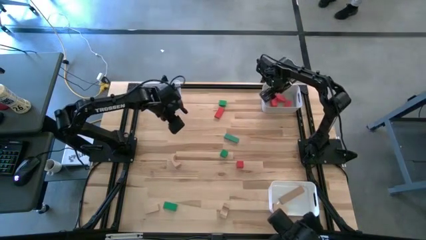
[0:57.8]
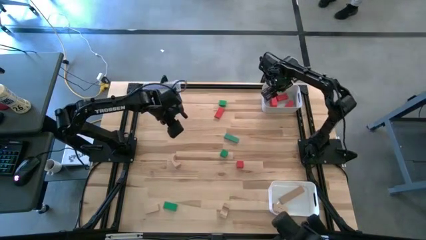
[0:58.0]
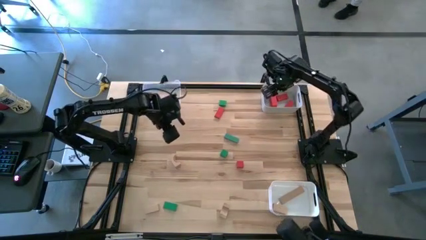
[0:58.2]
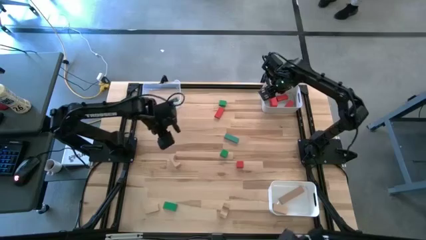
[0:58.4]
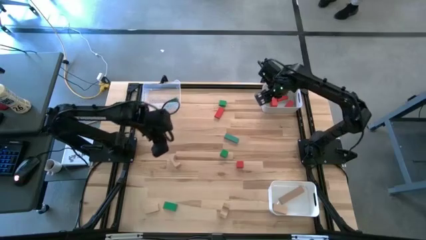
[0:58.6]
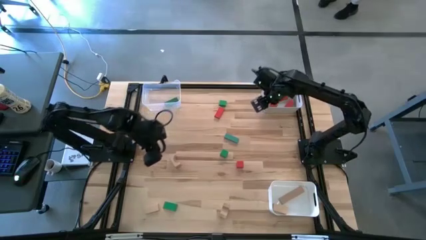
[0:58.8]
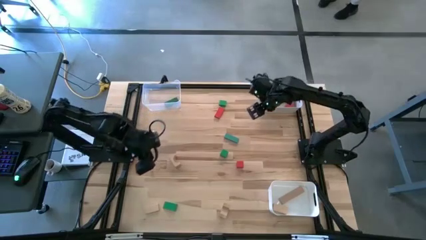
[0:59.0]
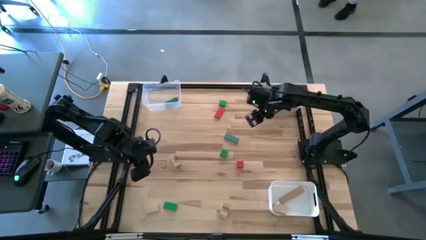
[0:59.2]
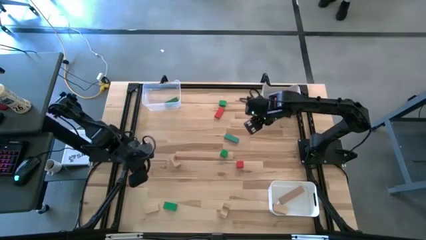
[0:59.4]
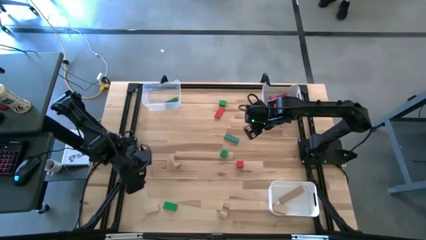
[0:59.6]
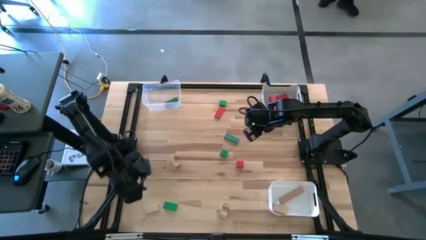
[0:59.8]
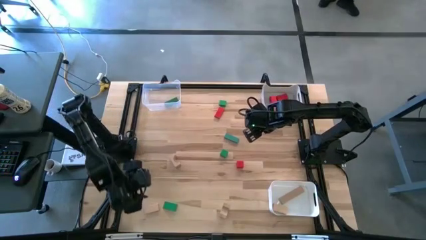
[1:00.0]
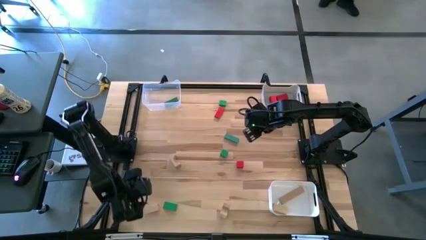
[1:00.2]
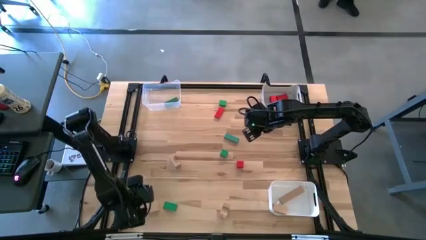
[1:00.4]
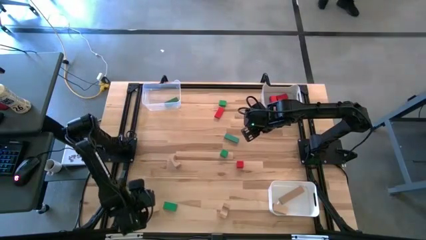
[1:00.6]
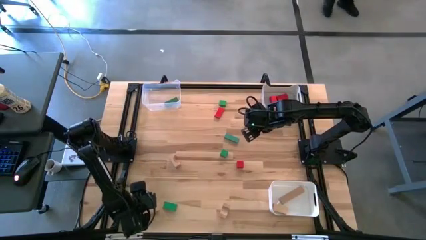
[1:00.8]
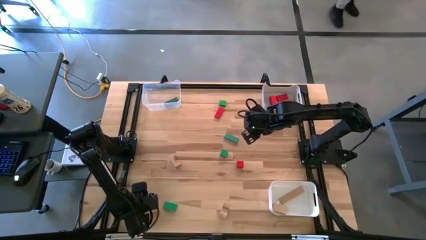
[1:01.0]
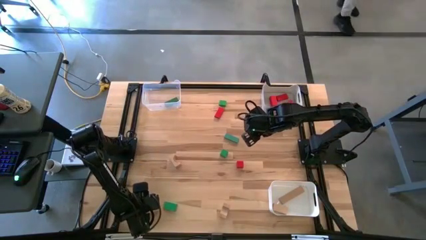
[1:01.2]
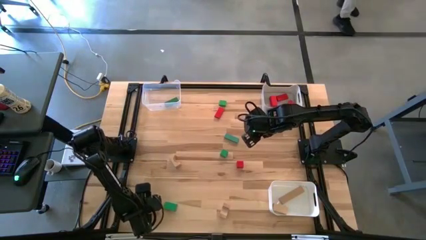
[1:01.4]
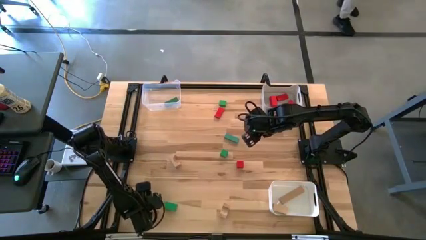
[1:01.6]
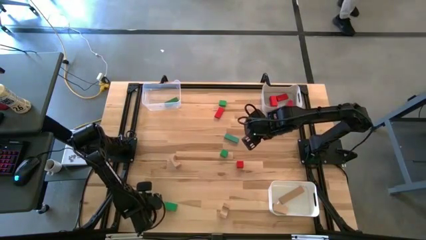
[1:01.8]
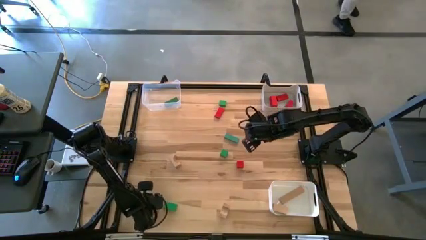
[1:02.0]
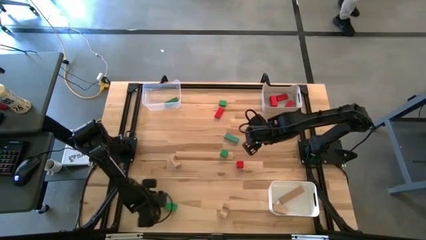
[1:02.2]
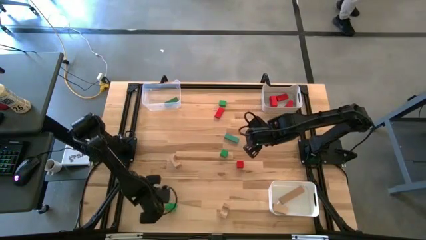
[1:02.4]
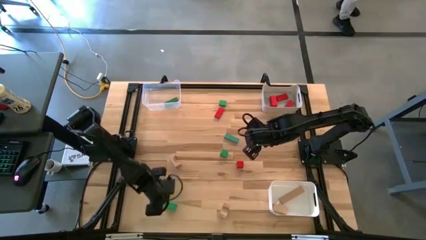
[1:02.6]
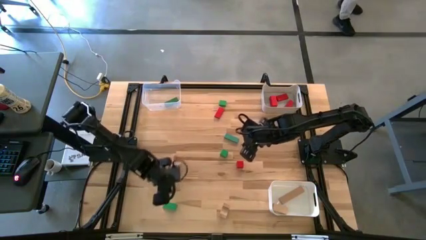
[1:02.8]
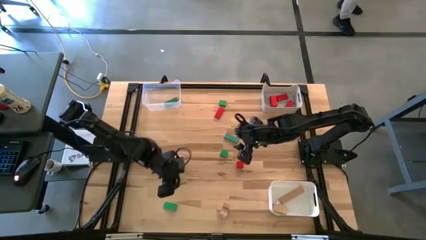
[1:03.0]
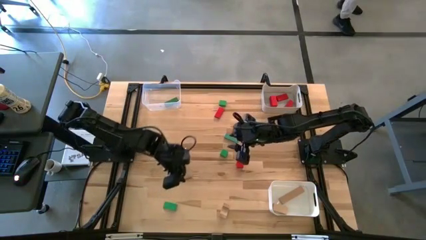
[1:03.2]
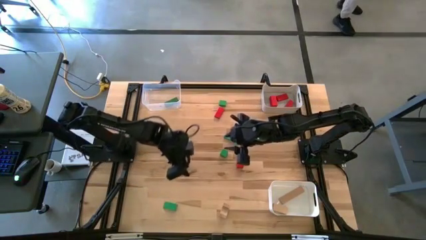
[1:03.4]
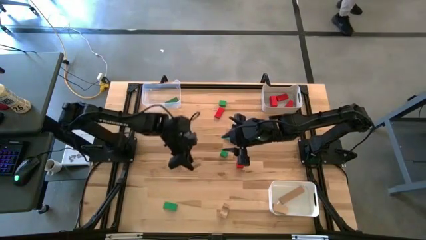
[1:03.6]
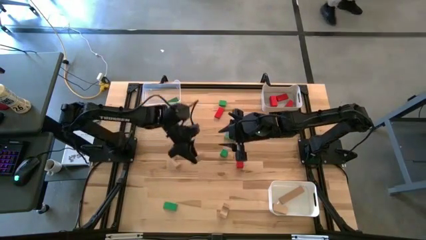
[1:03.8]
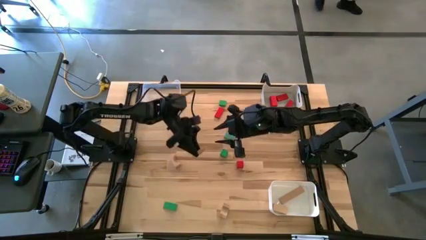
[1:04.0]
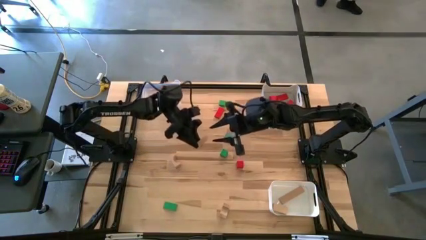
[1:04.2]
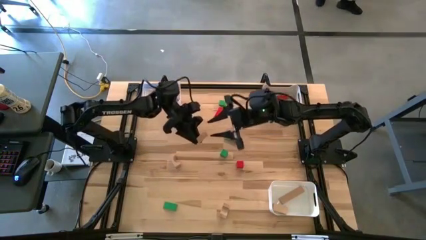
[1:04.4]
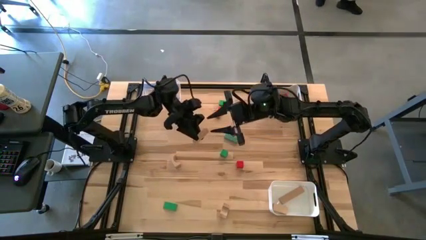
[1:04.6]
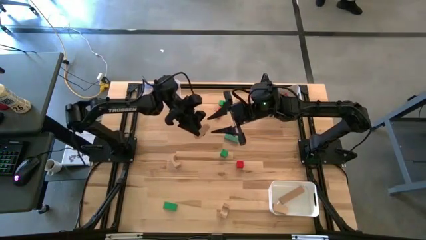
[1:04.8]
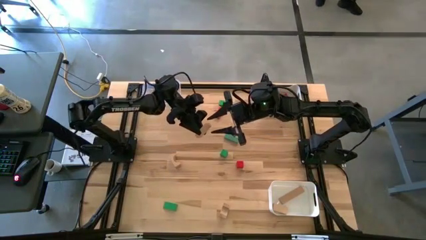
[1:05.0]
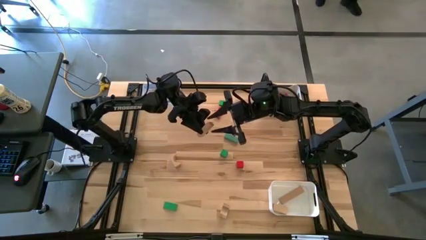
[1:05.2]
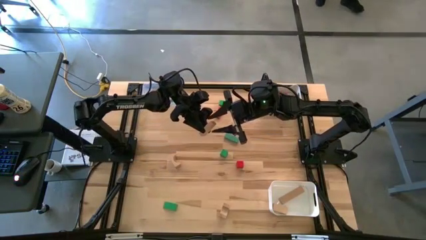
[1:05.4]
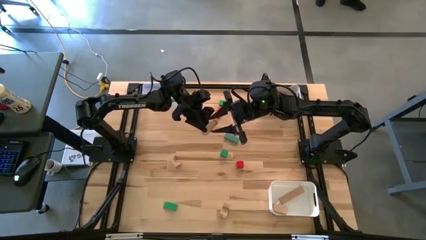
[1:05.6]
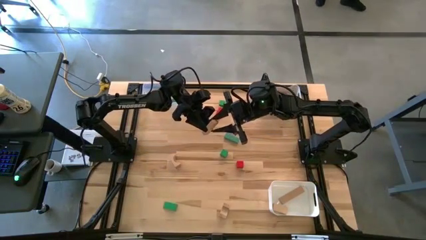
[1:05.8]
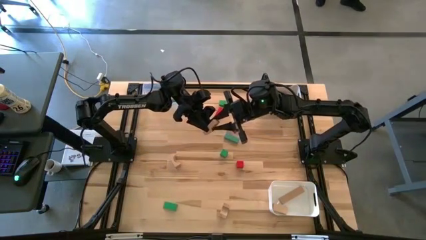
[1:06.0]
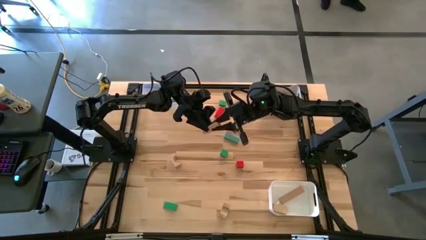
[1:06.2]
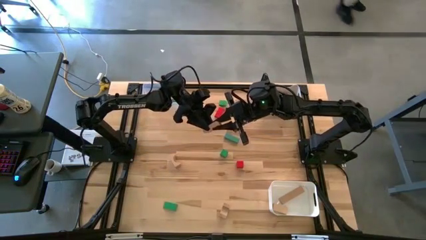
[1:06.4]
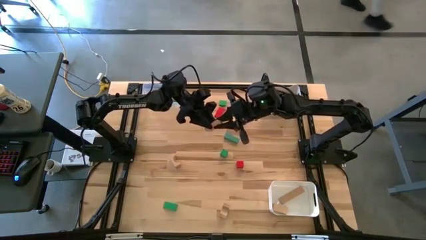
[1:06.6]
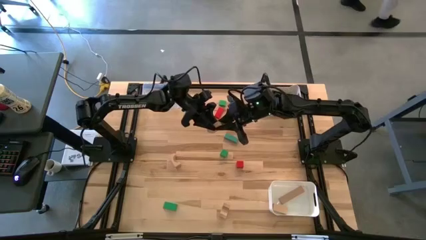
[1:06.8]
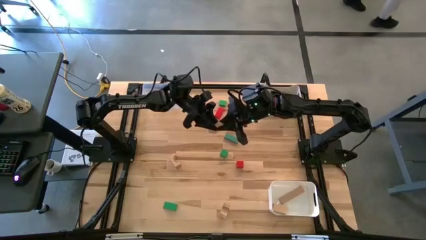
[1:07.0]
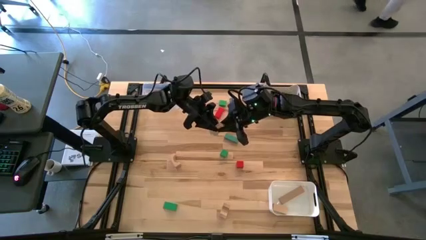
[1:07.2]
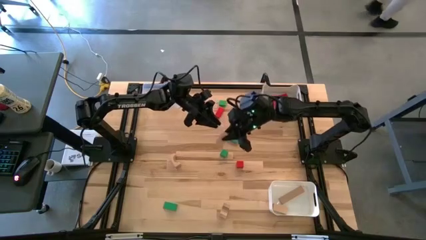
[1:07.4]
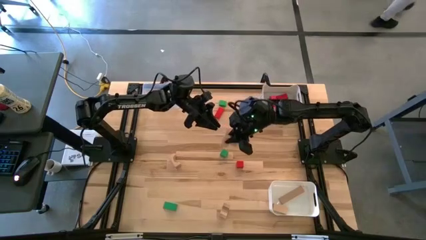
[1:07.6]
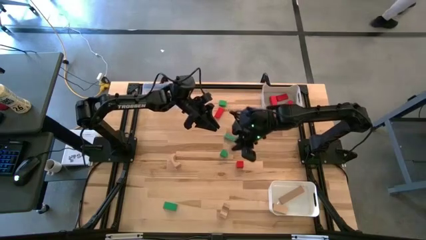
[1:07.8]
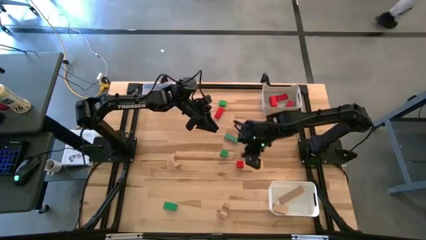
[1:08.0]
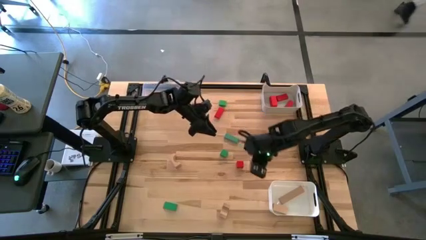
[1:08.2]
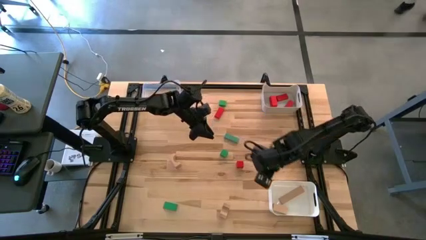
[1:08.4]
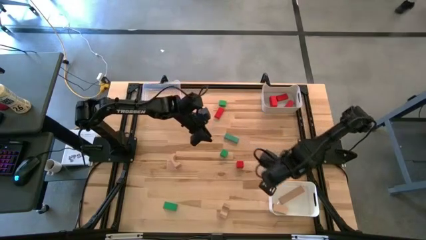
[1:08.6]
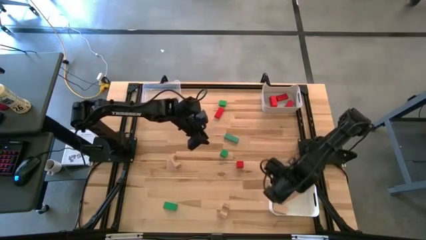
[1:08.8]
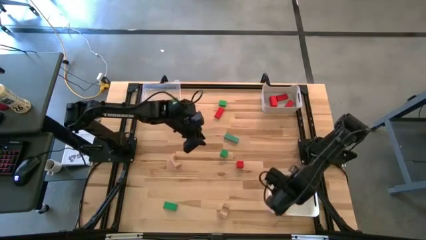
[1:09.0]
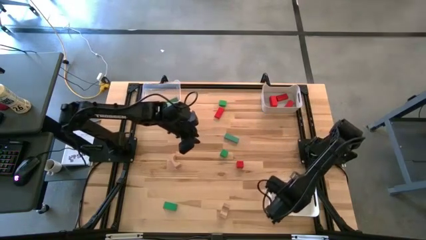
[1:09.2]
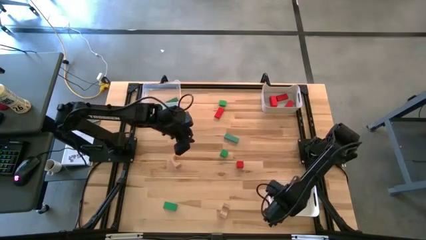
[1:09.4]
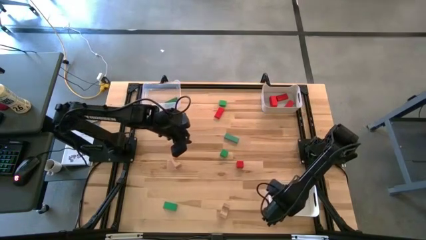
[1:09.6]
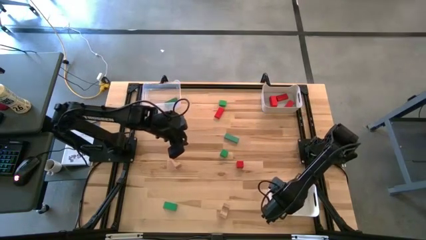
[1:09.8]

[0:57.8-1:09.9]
Task: Sort & place blocks by color
Put the brown block into the white bin
